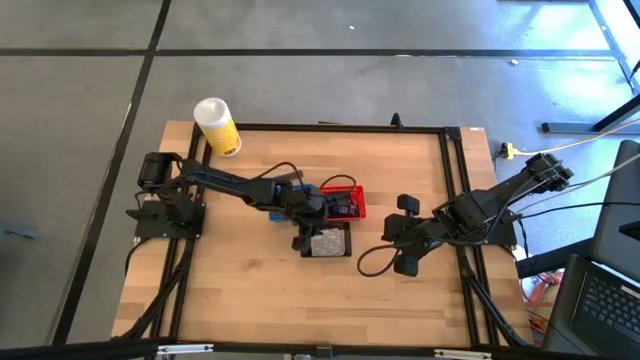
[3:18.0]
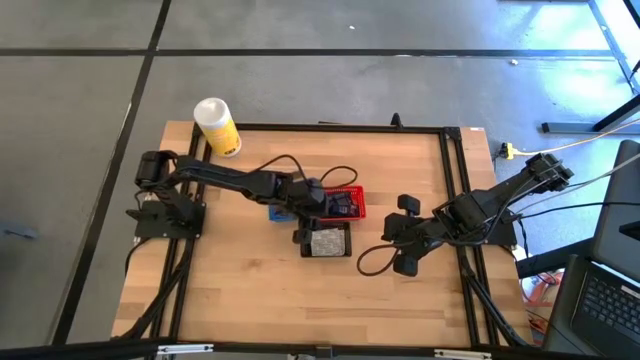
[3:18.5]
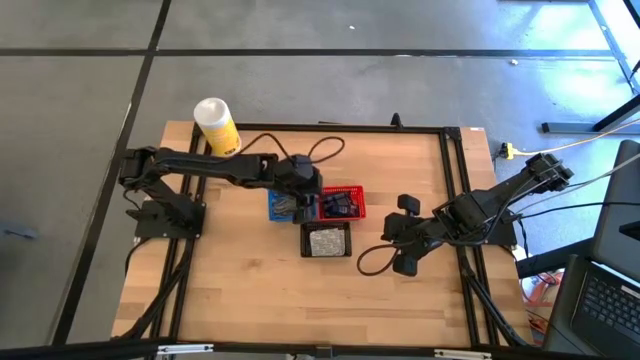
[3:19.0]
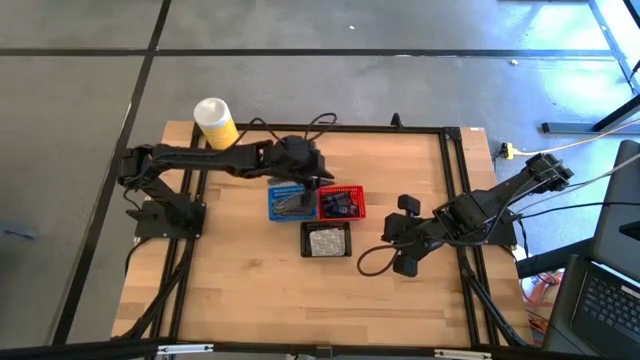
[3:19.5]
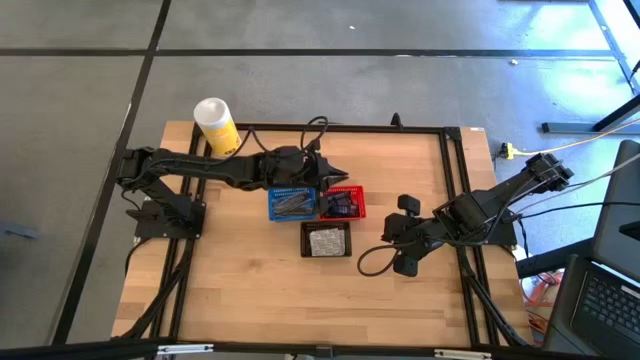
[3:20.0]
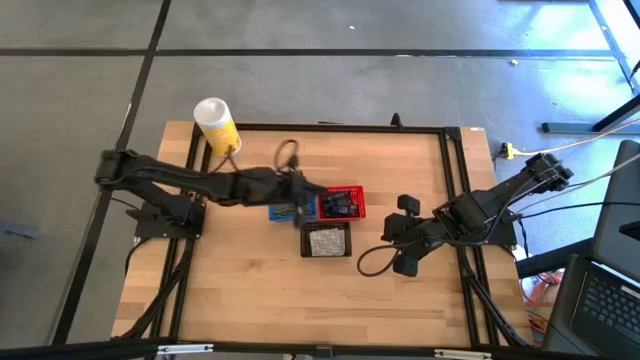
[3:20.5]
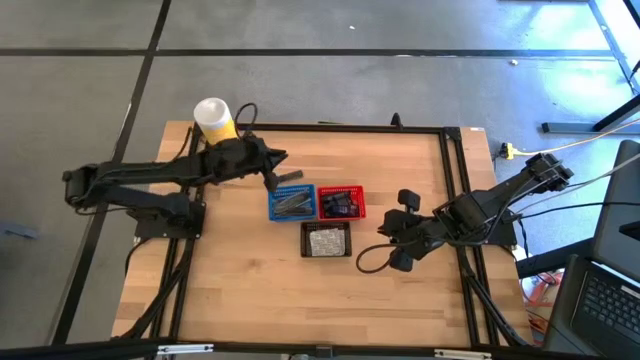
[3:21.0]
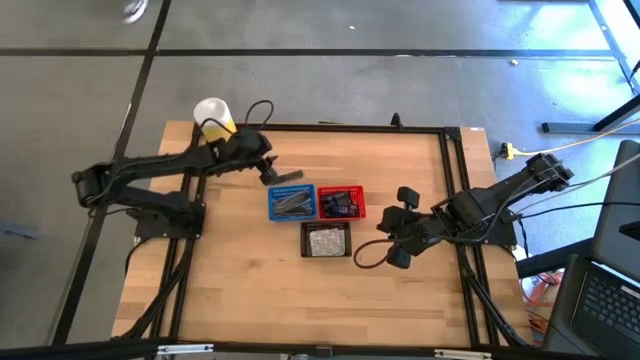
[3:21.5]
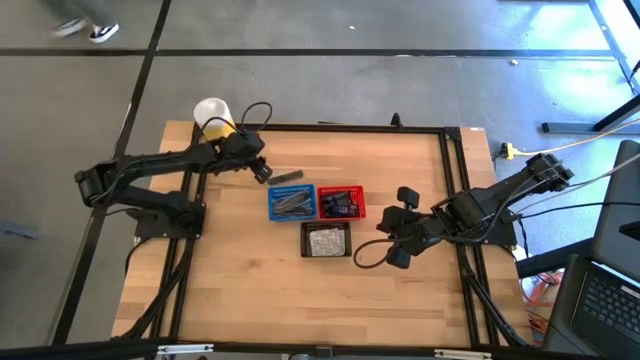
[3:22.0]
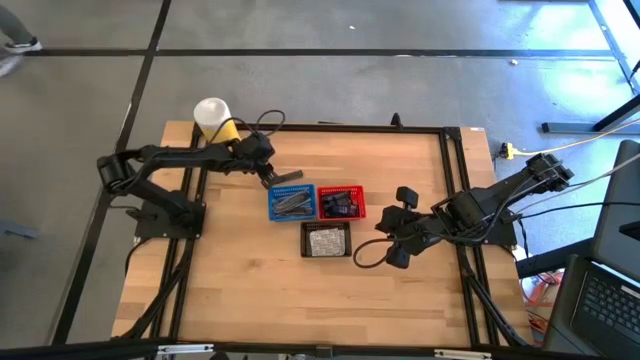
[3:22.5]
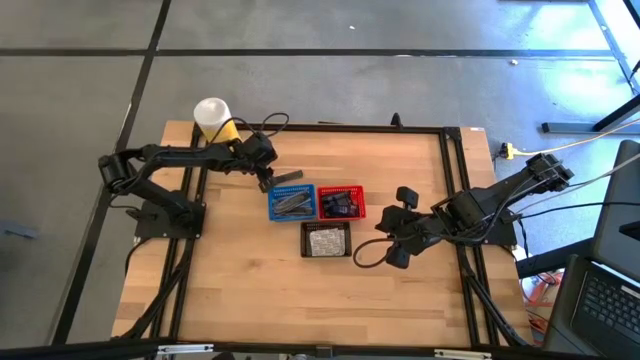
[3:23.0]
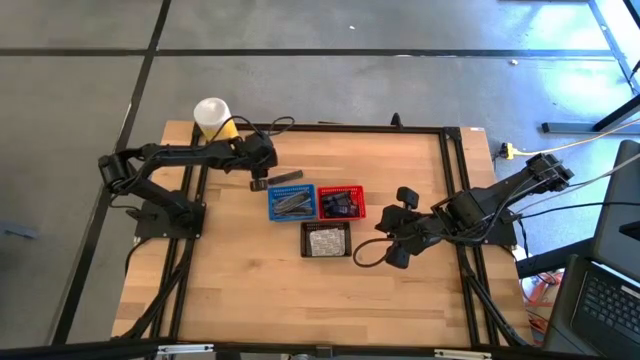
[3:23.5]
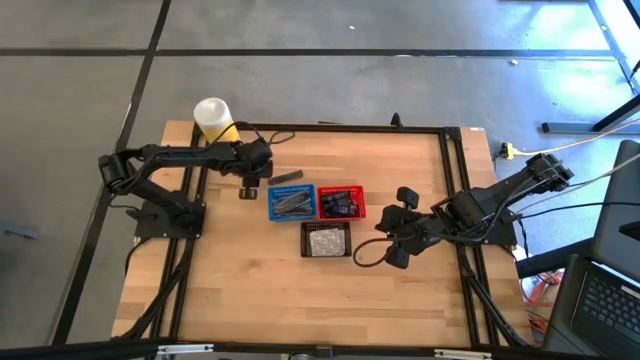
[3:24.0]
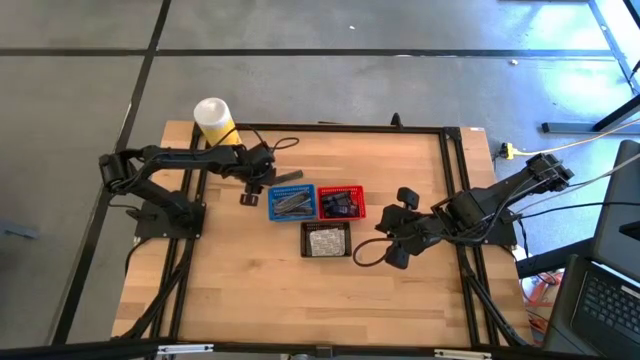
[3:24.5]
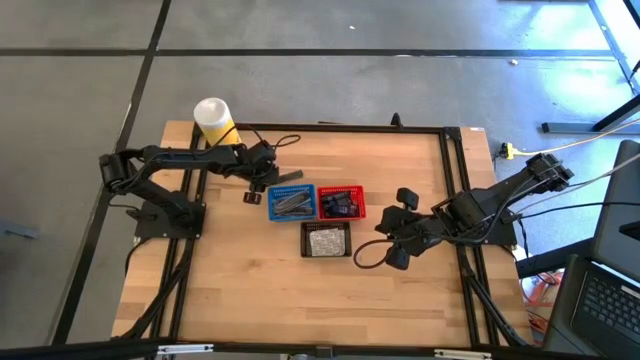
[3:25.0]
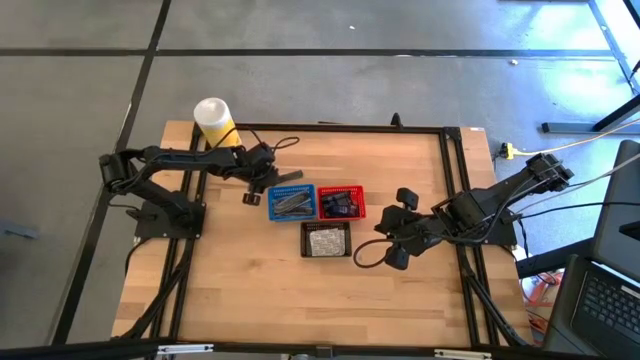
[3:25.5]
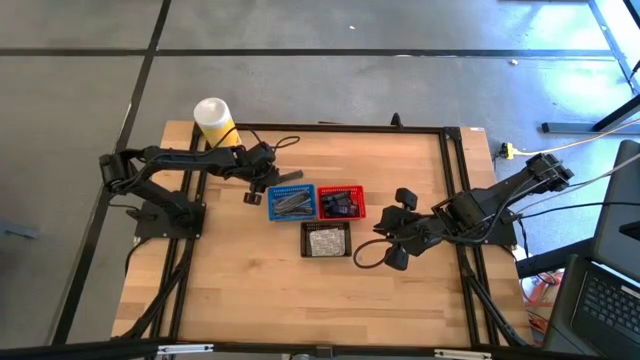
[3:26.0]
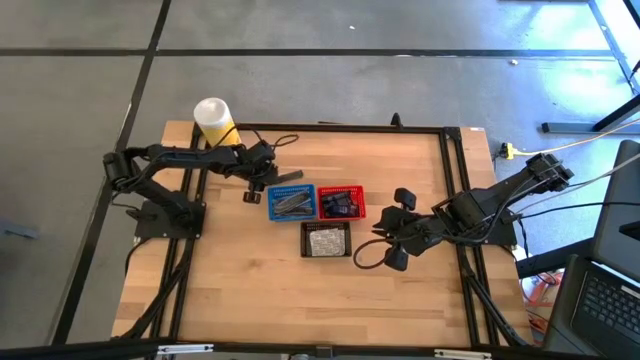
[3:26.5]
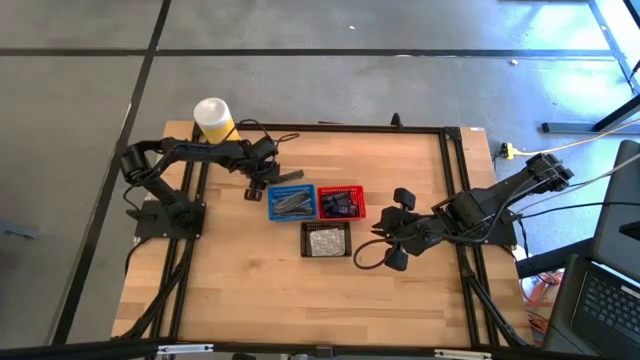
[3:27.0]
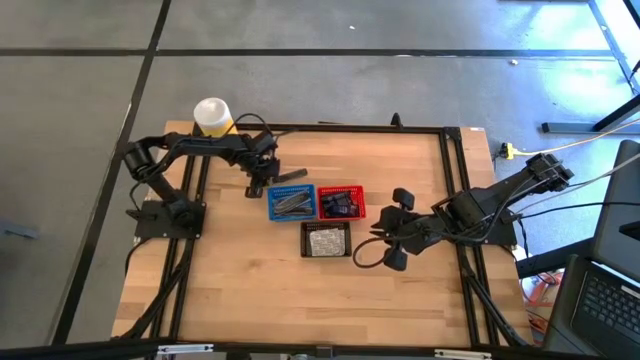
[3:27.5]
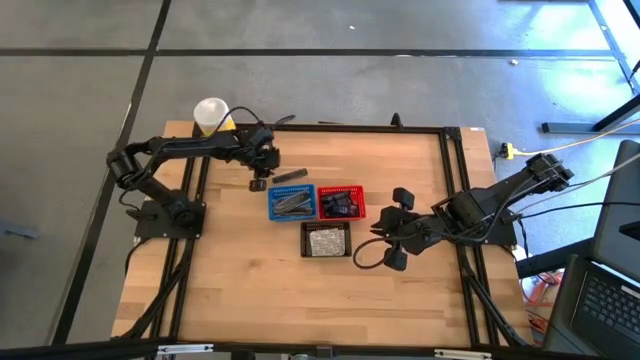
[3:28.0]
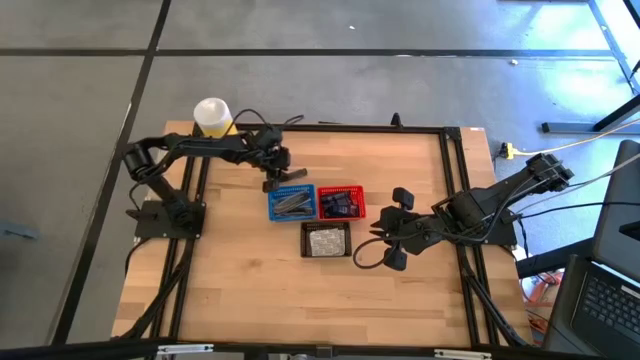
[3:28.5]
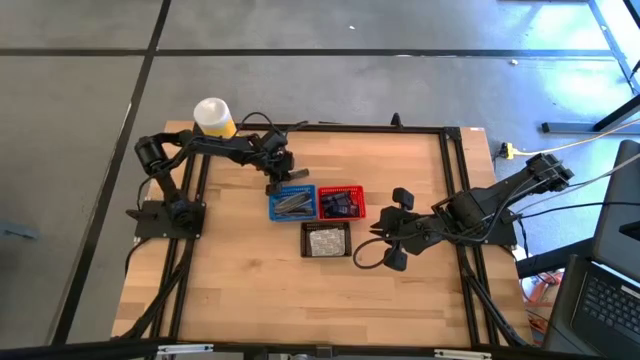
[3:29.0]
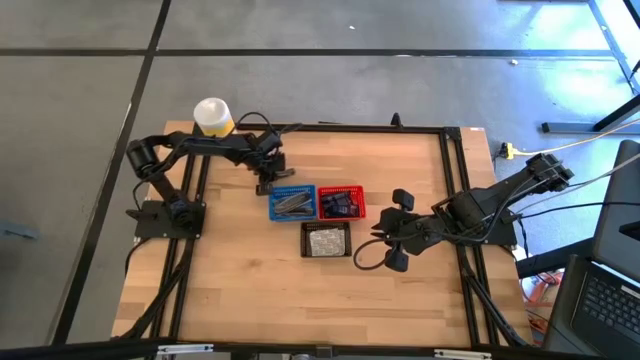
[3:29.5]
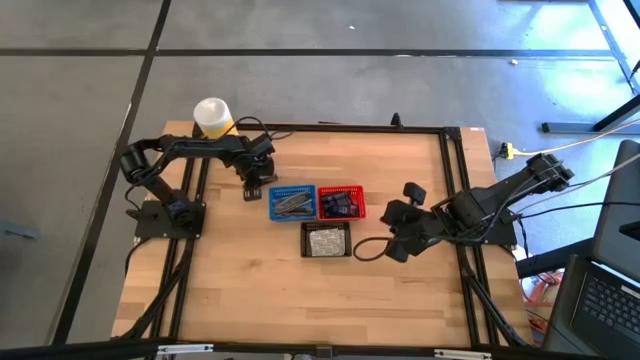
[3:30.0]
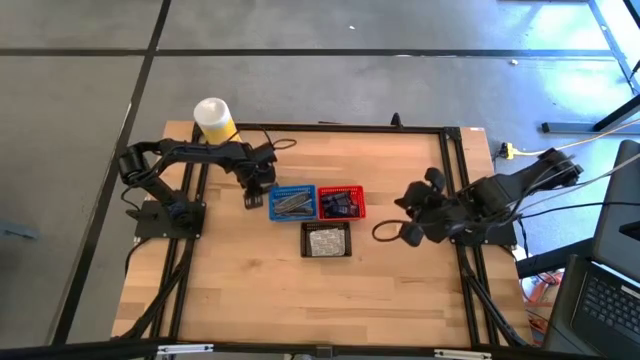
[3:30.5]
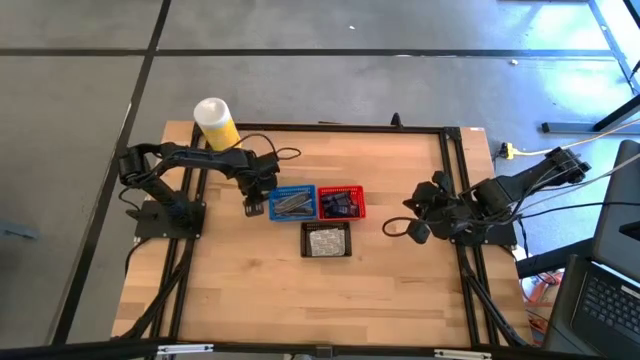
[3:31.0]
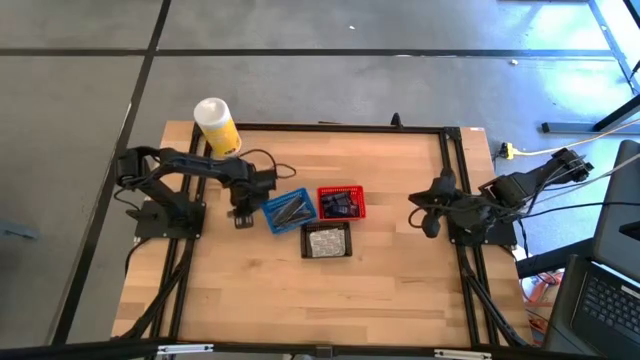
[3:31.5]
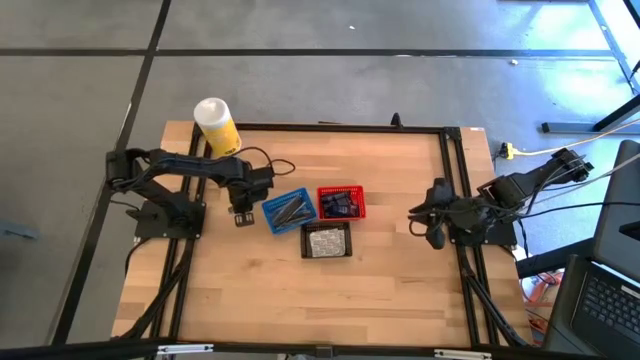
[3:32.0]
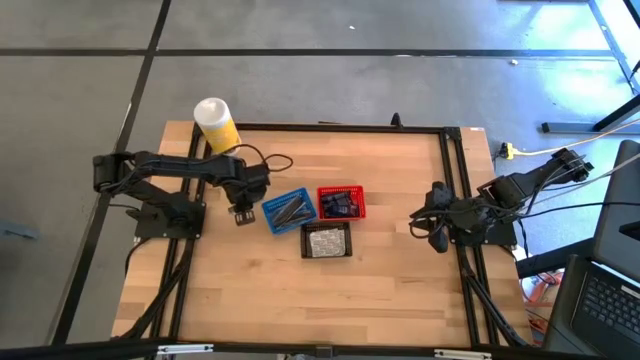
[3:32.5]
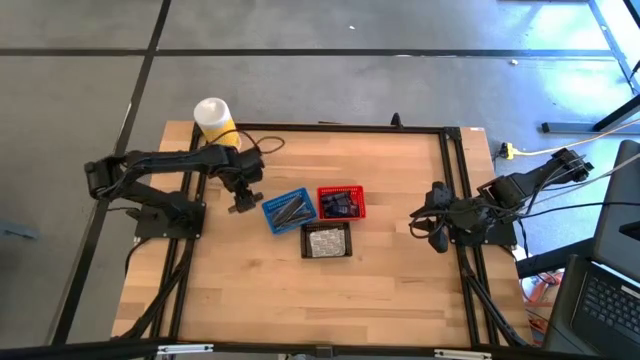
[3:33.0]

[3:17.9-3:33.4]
Task: Pick & Place Travel size toiletries
Put the black comb into the blue bin

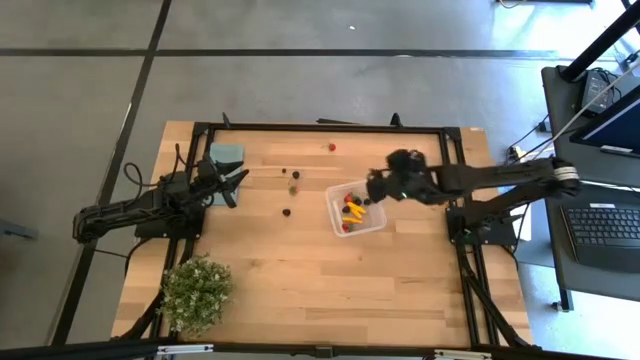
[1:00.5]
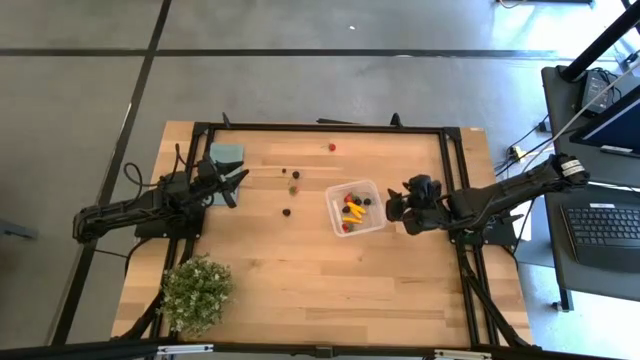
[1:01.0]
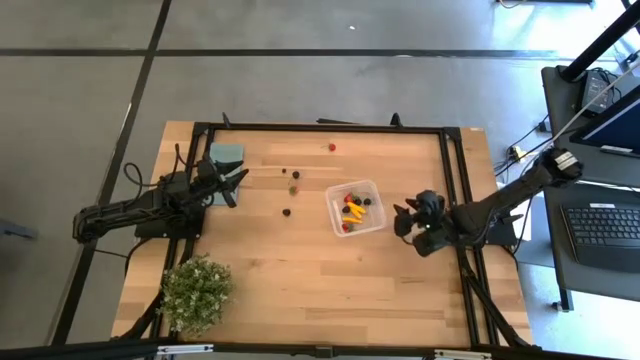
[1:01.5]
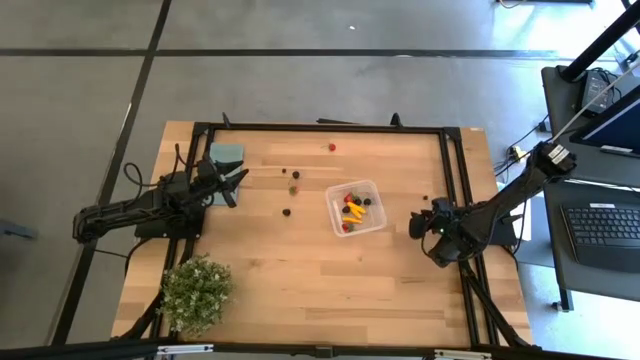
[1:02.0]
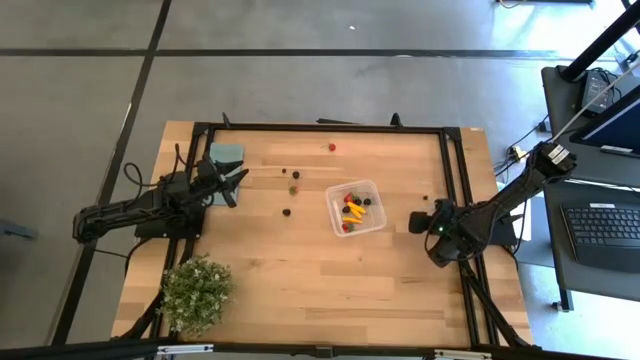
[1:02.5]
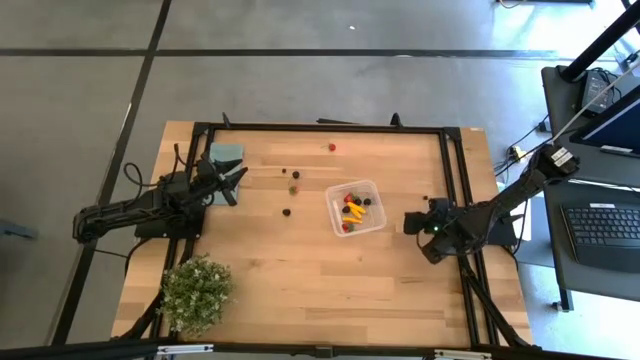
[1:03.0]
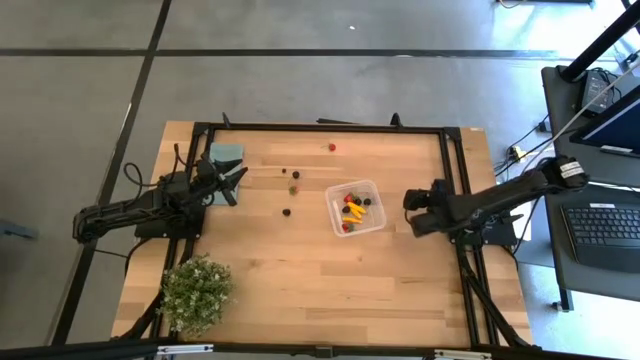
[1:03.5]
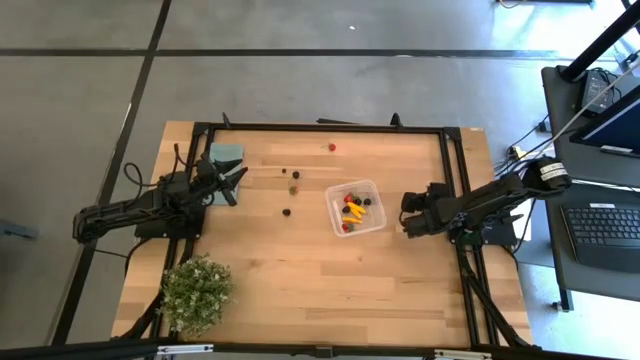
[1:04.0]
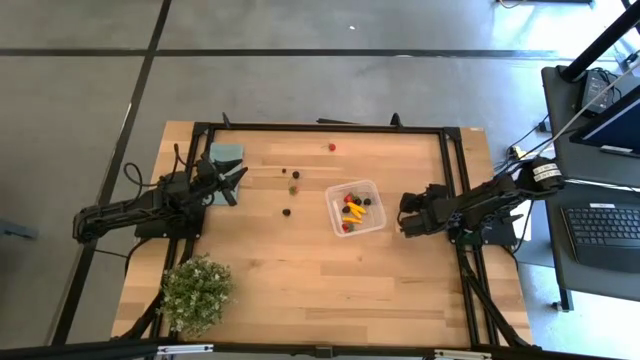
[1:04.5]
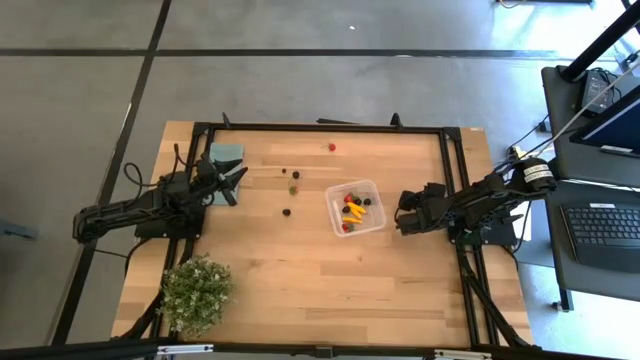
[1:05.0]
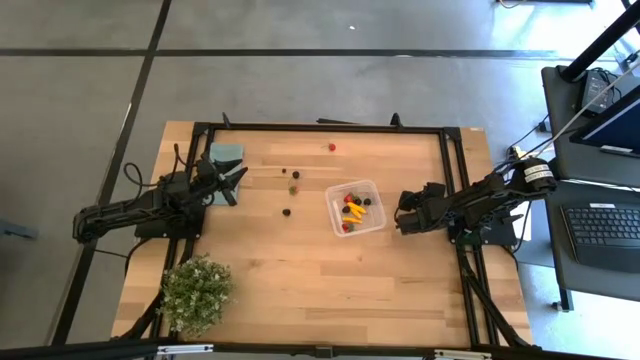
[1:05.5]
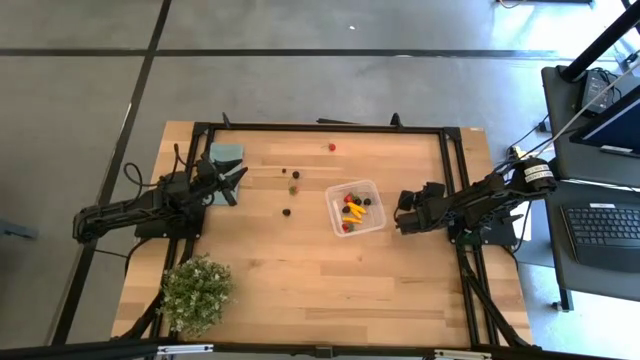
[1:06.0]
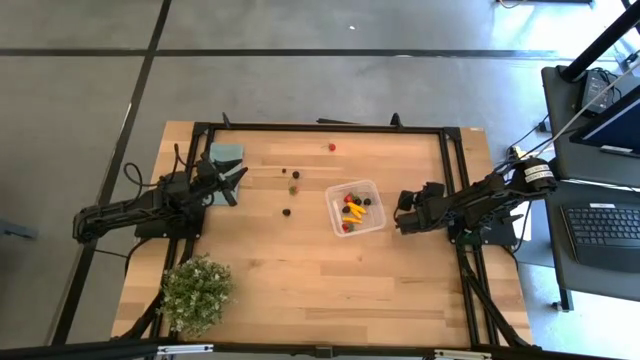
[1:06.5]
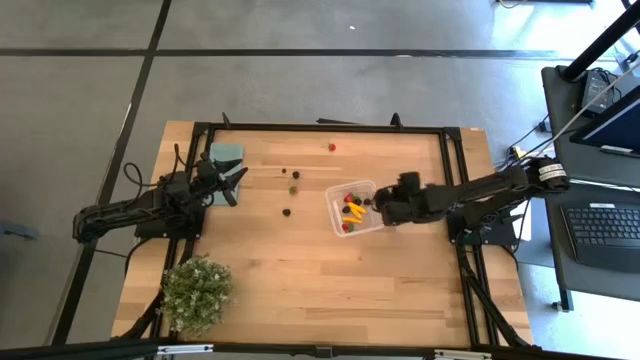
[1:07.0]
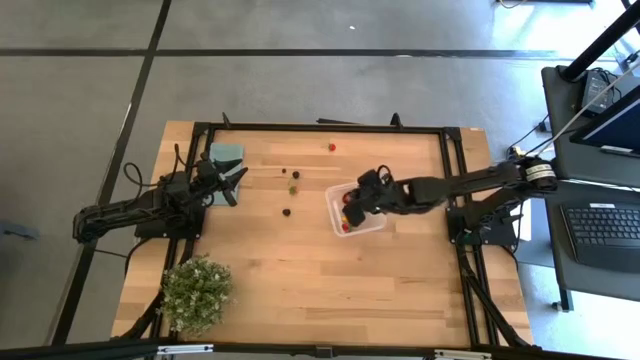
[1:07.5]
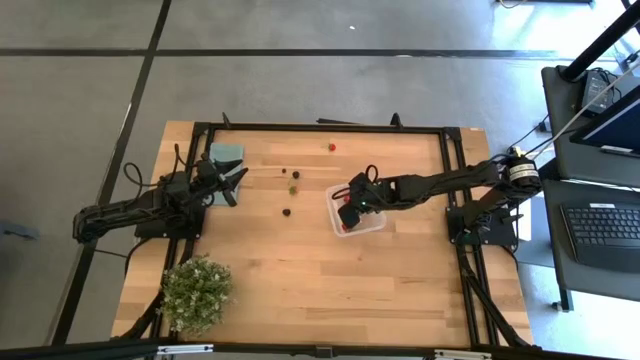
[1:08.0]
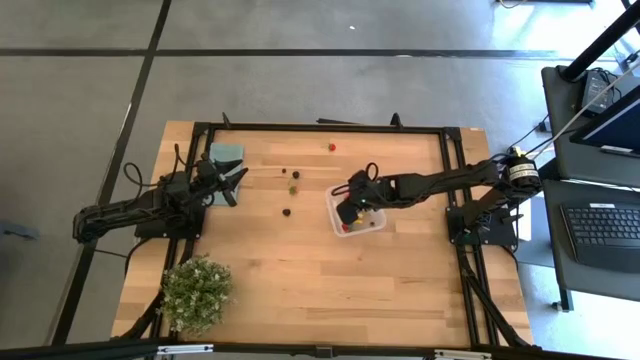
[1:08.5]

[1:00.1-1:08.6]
Task: Pick and placing Produce into tupperware
Put the middle right blueberry into the transparent bin
